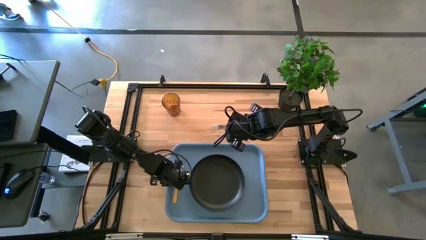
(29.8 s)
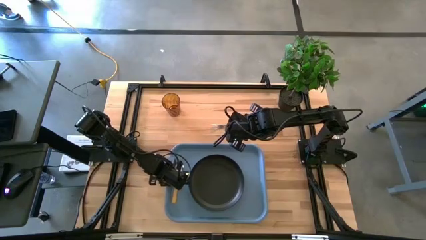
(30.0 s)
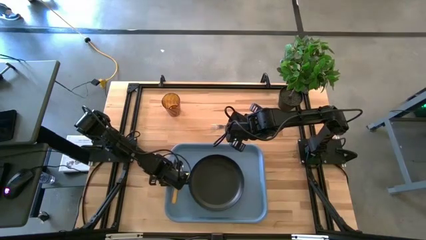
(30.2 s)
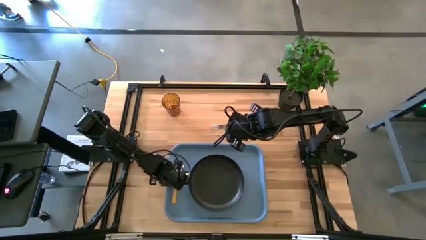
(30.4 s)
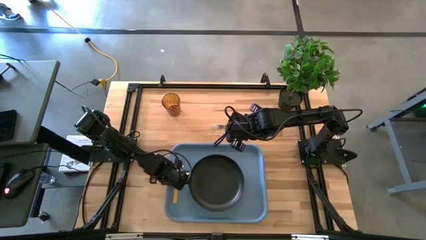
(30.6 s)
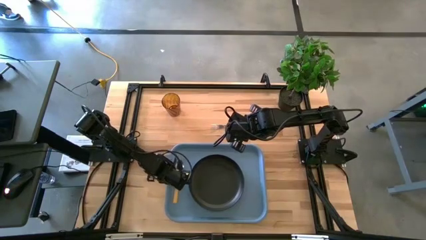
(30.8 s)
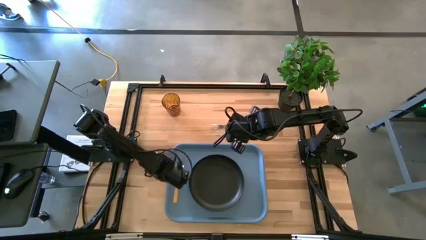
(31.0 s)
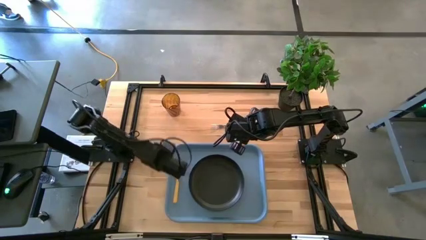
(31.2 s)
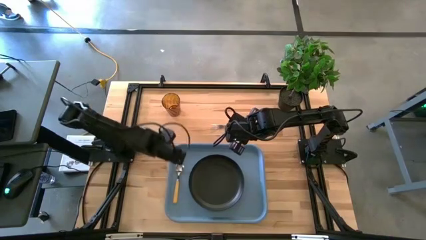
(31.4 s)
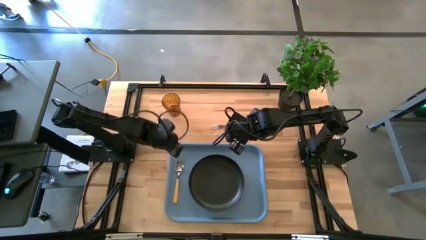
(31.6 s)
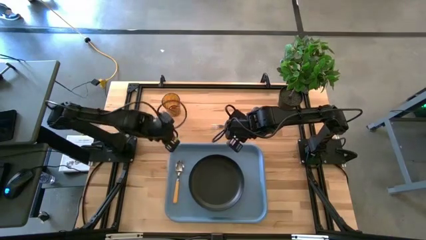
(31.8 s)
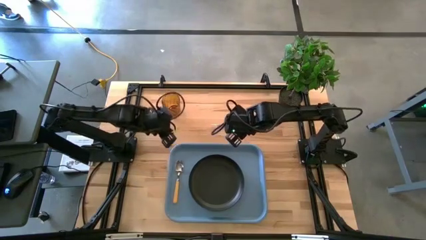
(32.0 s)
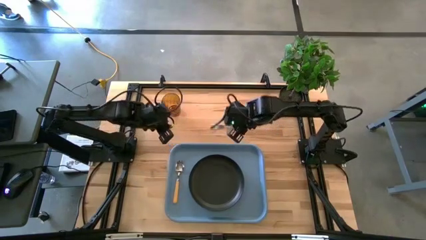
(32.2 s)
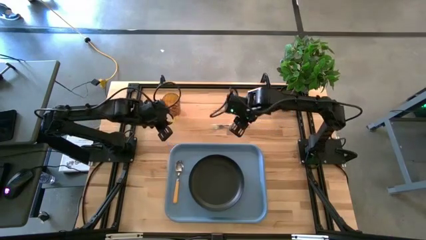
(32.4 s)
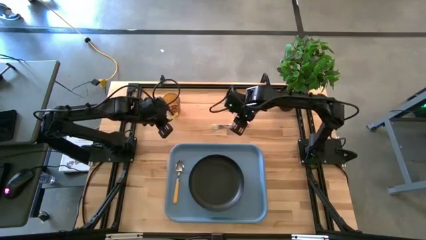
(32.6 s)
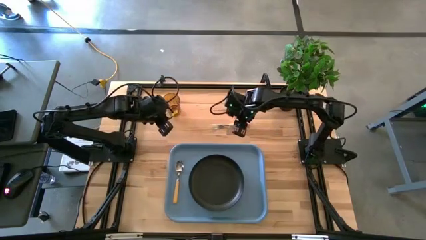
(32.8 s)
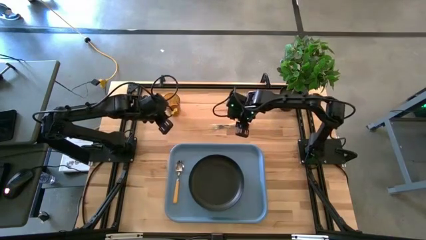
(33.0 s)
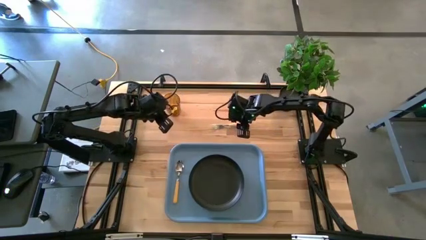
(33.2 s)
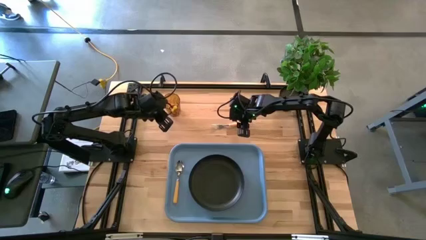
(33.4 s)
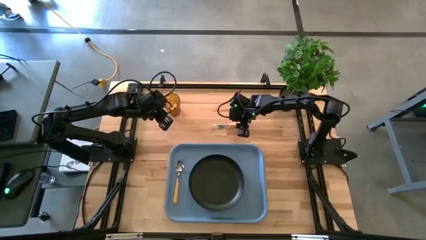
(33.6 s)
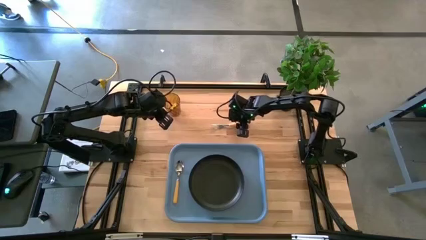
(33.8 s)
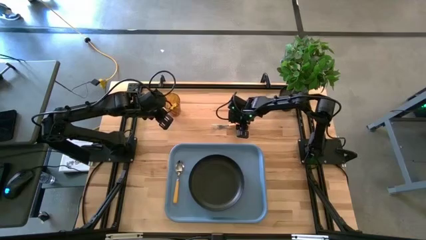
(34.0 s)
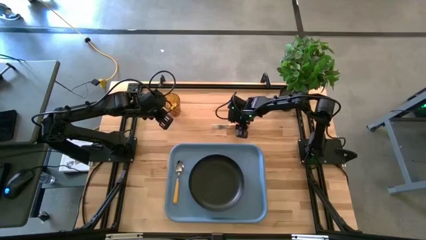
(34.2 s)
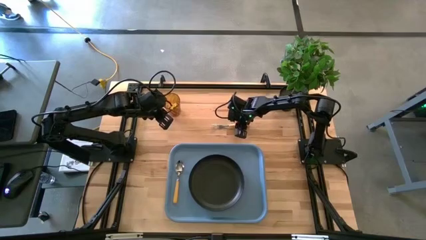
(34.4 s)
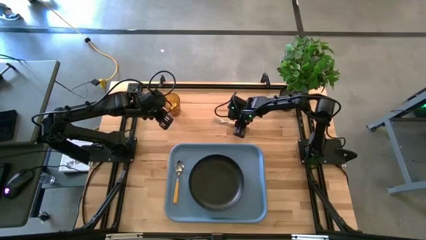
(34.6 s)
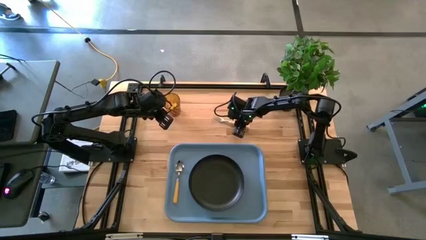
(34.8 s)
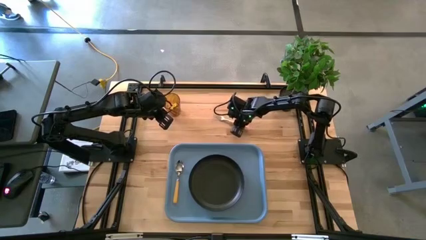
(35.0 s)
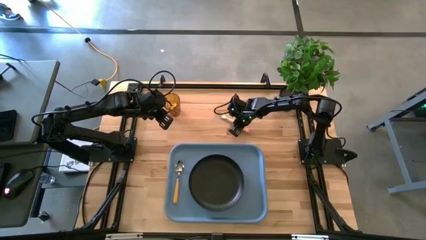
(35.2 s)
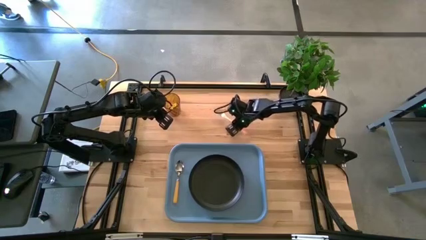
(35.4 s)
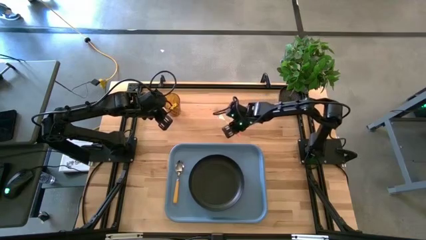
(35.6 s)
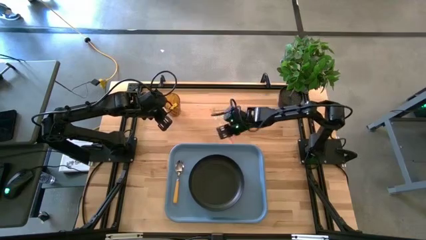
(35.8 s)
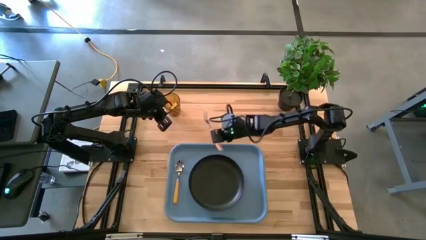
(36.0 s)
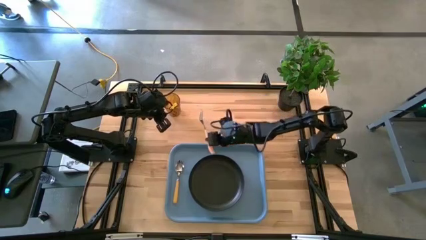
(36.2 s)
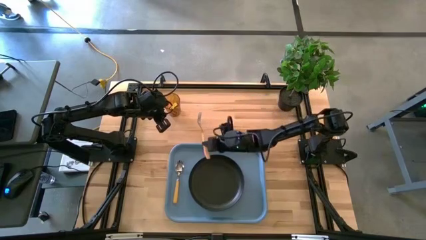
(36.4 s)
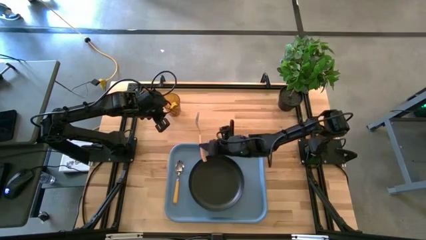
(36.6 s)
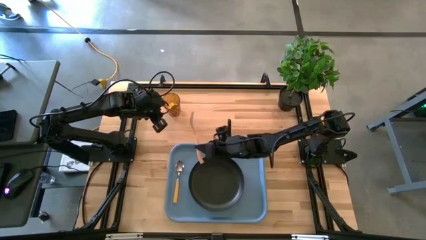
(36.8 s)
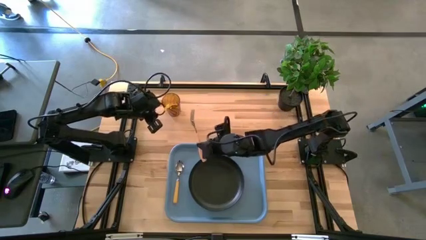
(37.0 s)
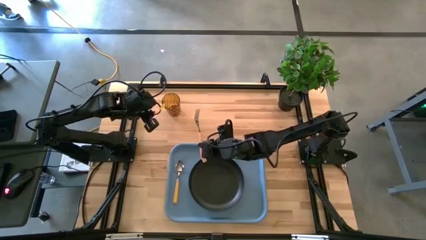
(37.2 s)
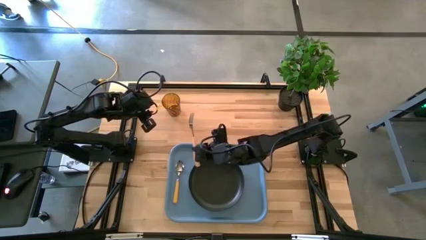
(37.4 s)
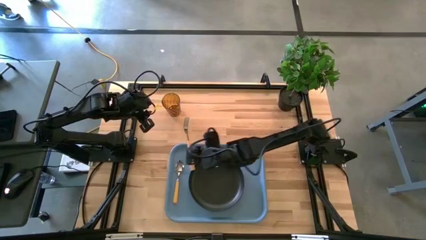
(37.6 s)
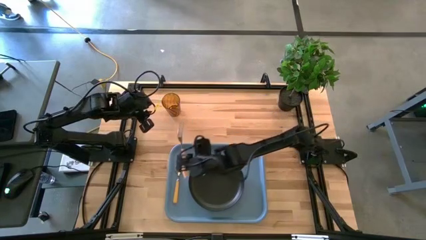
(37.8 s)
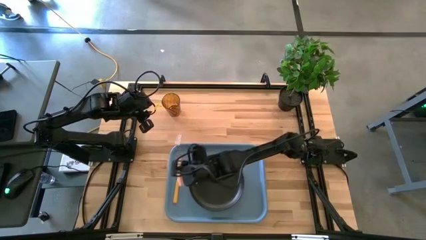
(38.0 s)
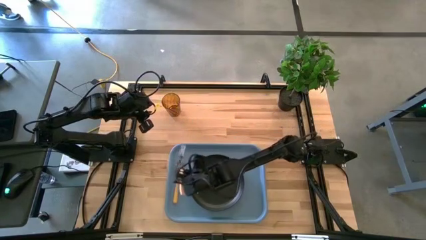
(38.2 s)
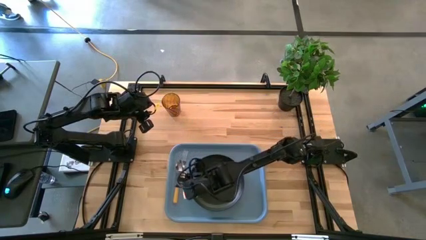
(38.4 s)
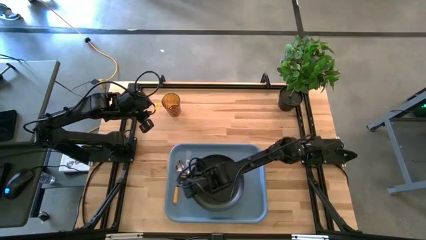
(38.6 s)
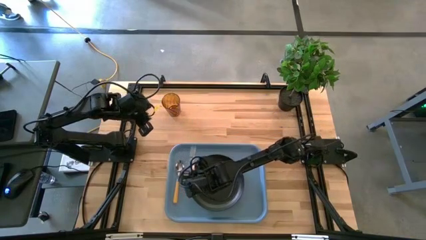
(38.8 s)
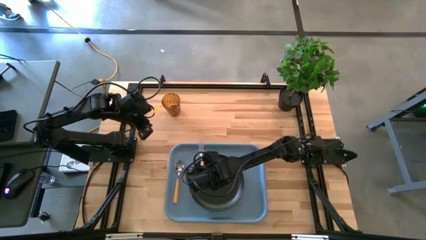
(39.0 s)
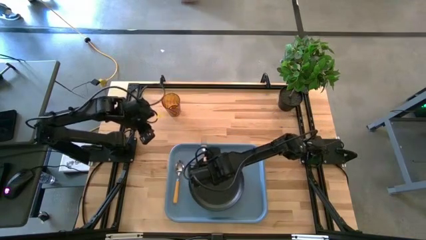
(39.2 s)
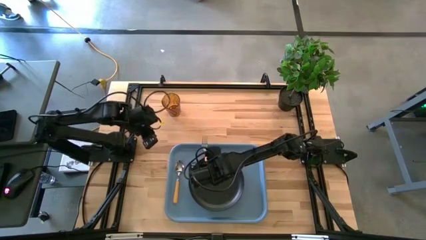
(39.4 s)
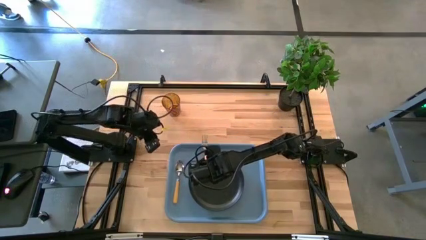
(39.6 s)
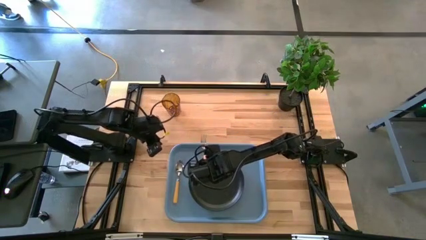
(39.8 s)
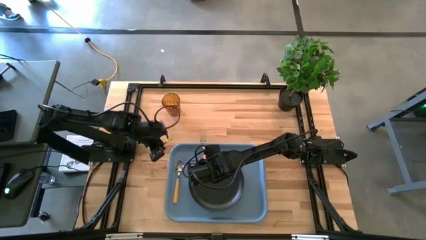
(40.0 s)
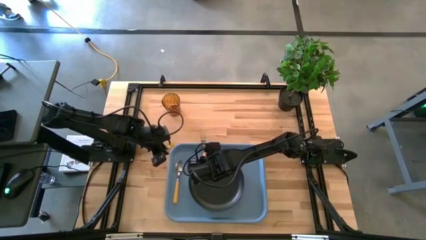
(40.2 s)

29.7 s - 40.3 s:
Task: Pick and place plate/cup/fork/spoon on tray
Put the brown fork on the blue serving tray to the left of the black plate

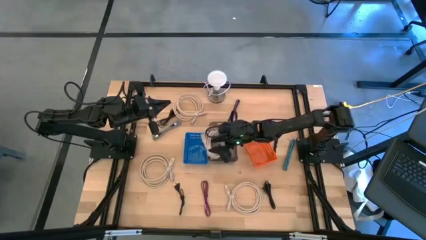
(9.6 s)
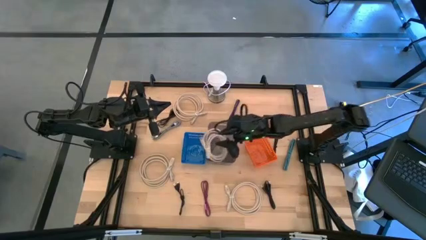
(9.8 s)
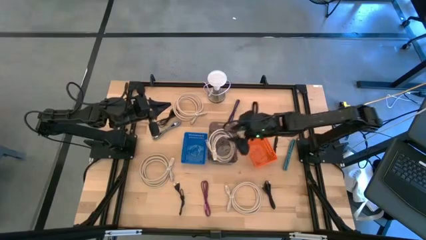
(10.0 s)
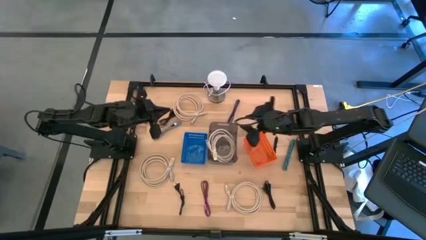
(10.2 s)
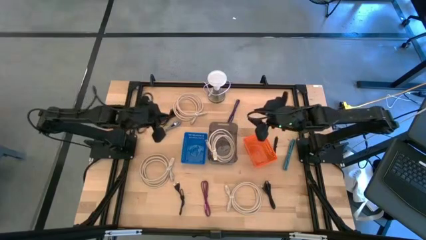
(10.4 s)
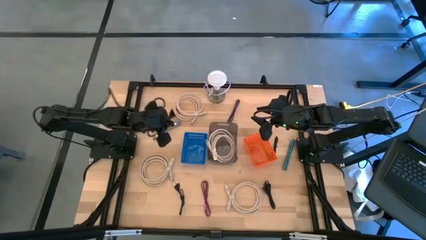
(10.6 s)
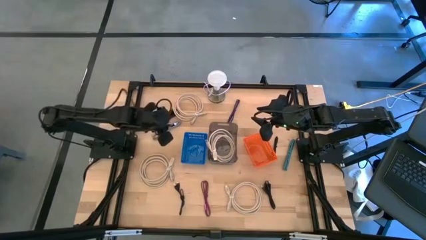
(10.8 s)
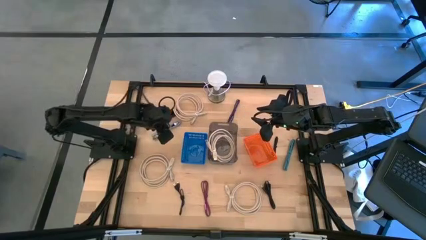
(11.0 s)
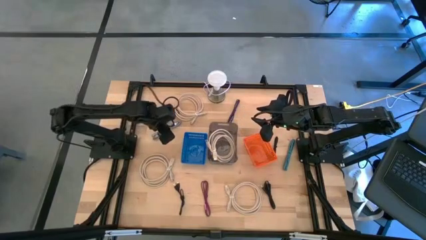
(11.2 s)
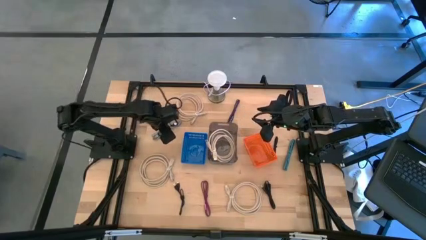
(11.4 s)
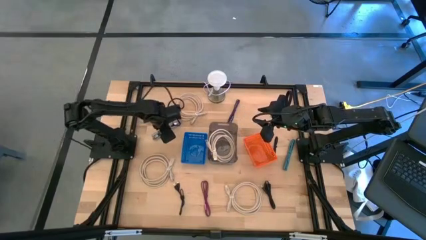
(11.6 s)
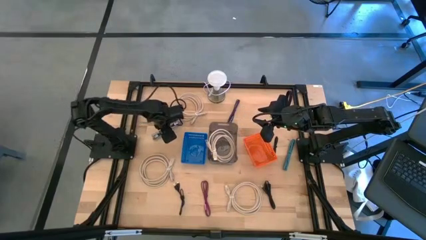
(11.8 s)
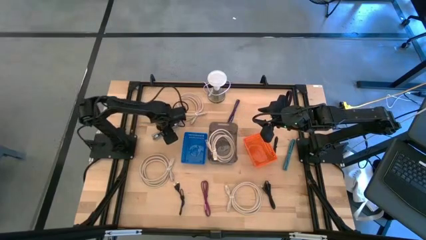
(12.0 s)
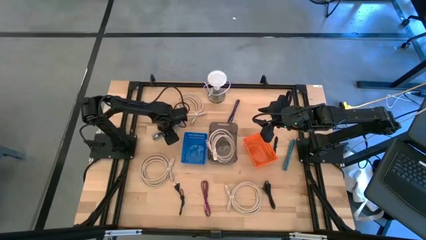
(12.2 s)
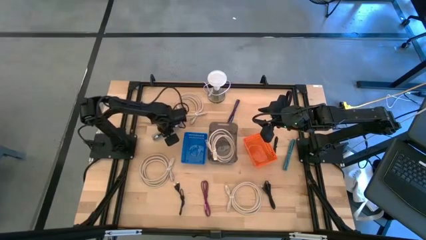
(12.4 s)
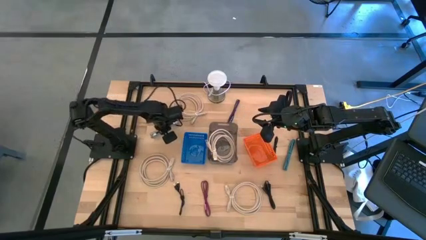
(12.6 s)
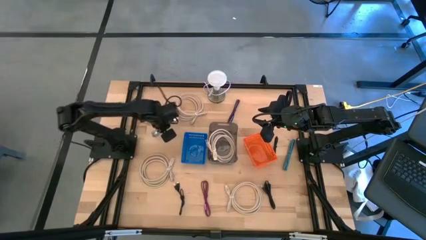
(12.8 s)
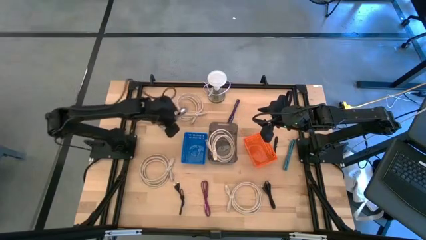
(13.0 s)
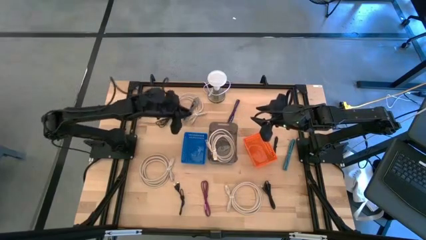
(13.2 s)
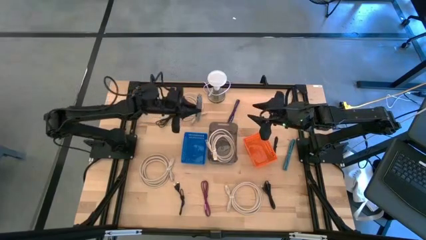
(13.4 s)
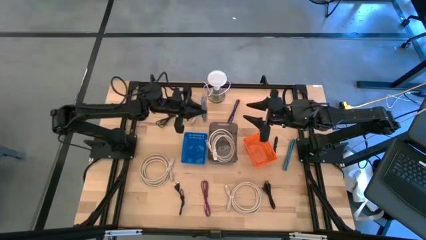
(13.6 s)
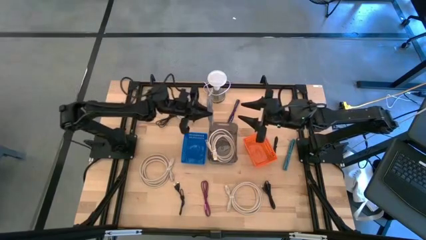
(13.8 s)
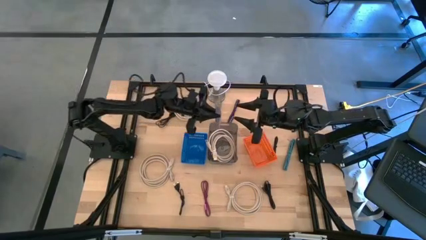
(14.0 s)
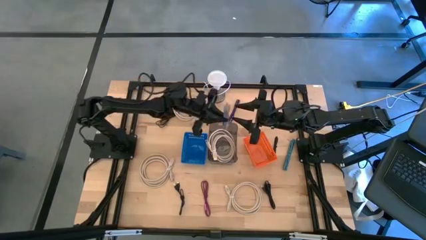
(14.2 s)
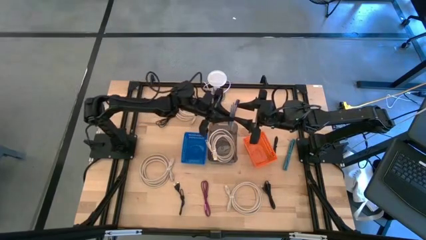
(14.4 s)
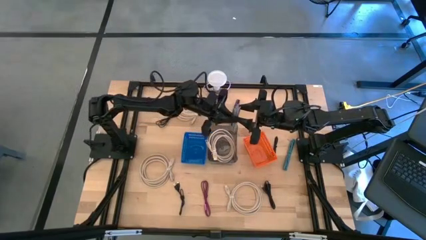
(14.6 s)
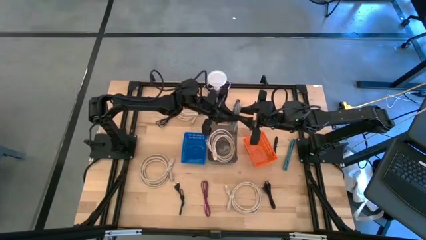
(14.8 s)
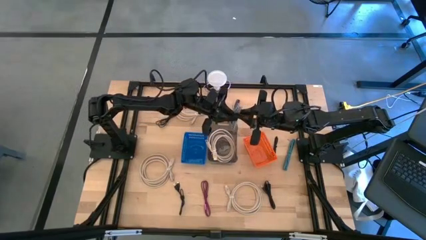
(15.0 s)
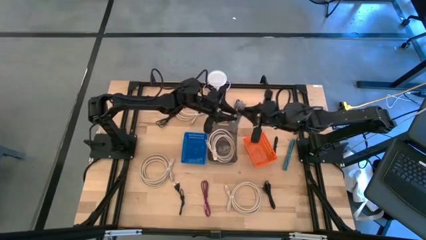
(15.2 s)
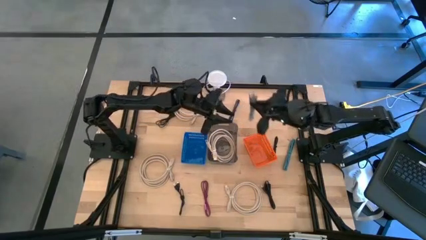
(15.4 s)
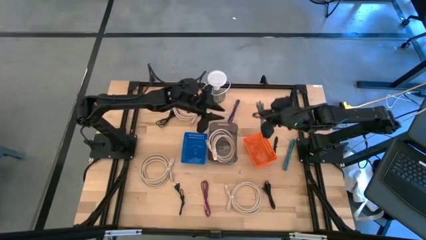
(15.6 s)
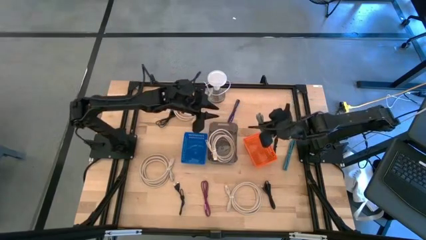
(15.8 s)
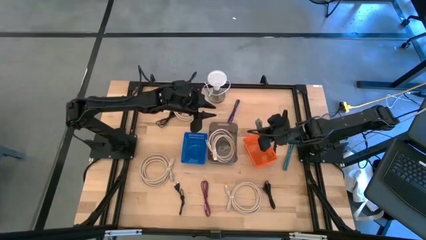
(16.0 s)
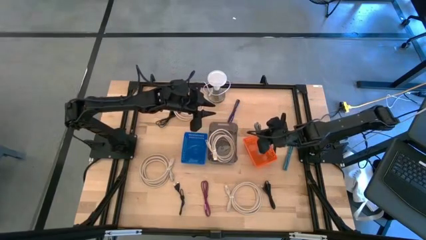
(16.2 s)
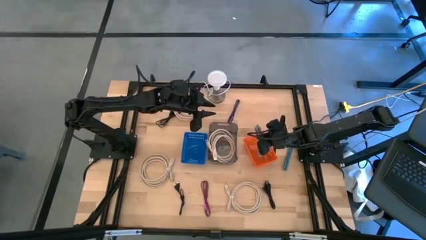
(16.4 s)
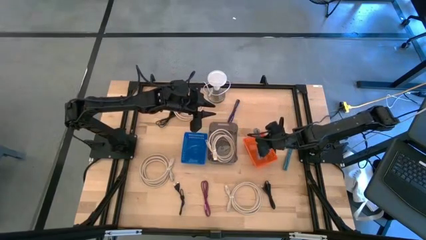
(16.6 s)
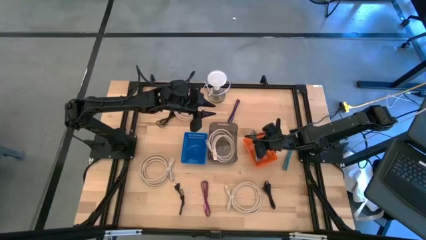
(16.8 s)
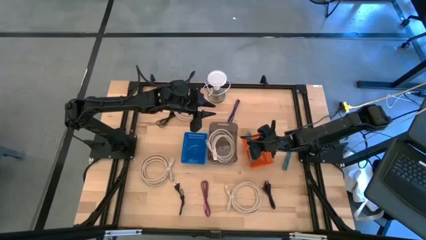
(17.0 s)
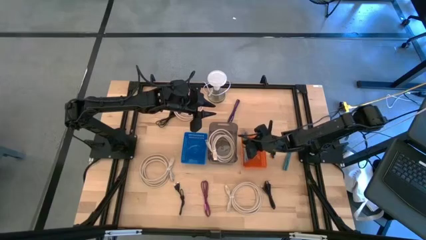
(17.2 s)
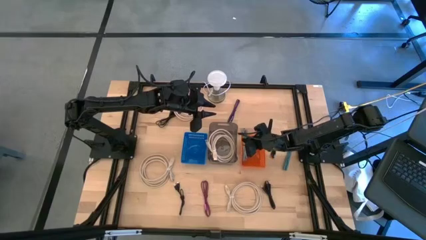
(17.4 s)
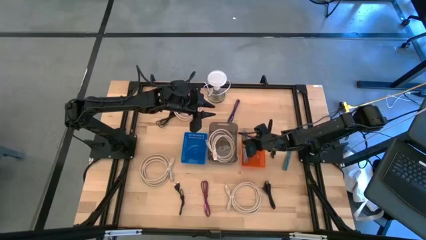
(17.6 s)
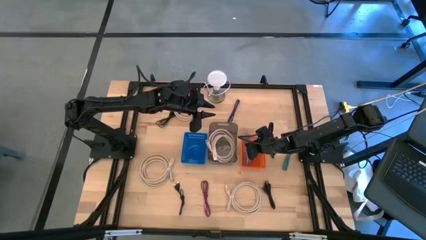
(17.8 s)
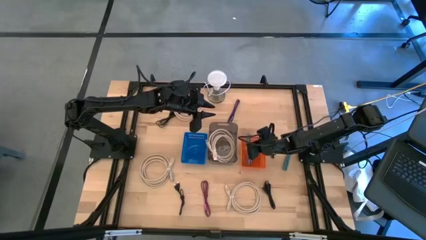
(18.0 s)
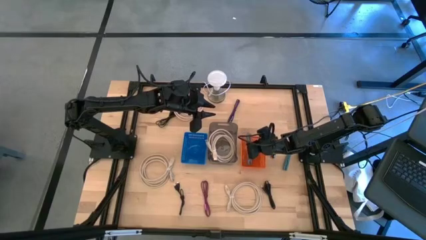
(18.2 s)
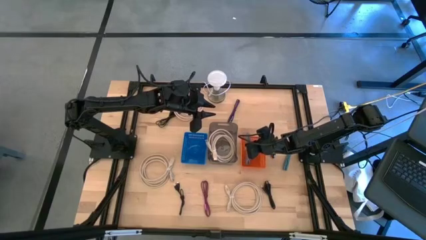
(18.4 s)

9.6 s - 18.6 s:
Task: Pick & Place USB Port
Put the black and white charger cable into the orange bin
